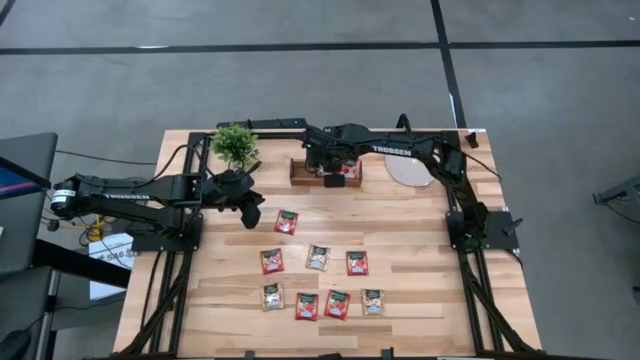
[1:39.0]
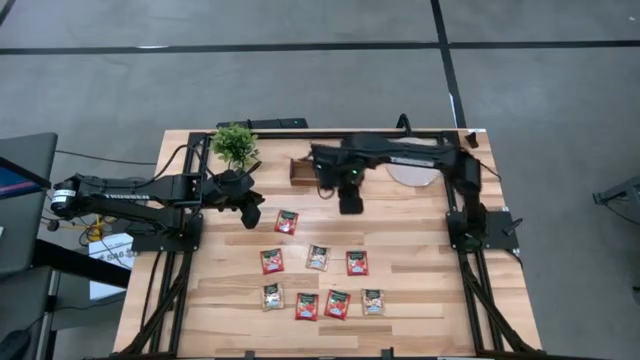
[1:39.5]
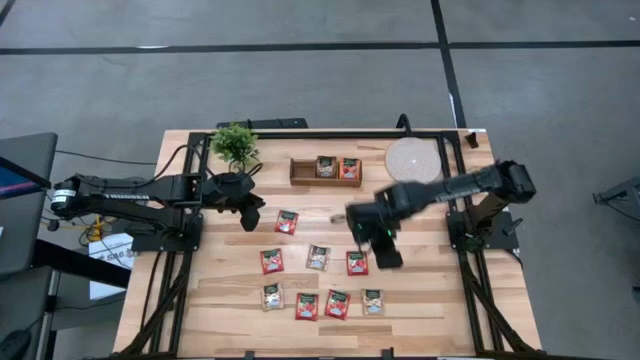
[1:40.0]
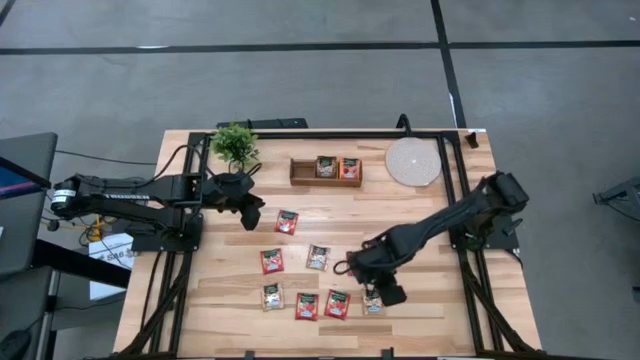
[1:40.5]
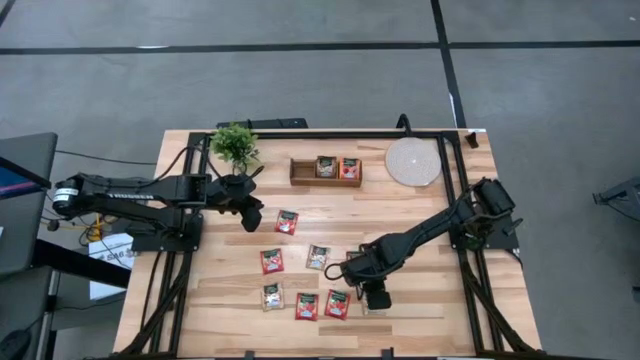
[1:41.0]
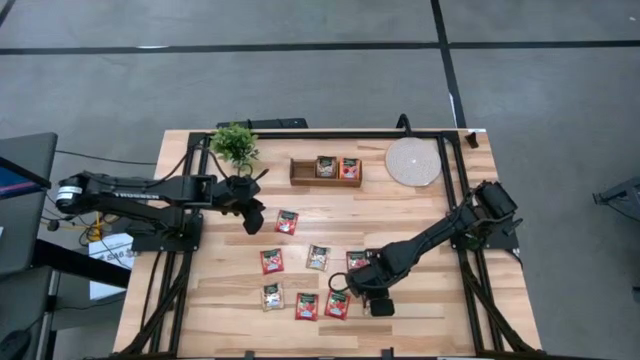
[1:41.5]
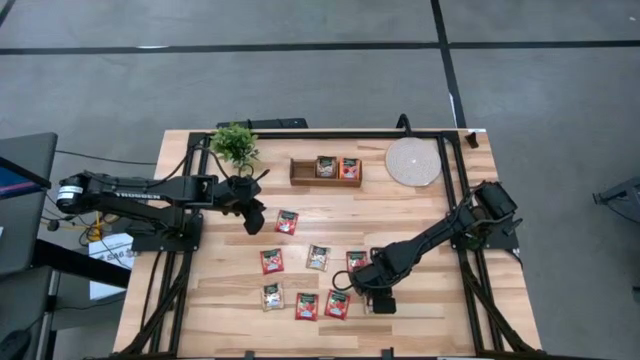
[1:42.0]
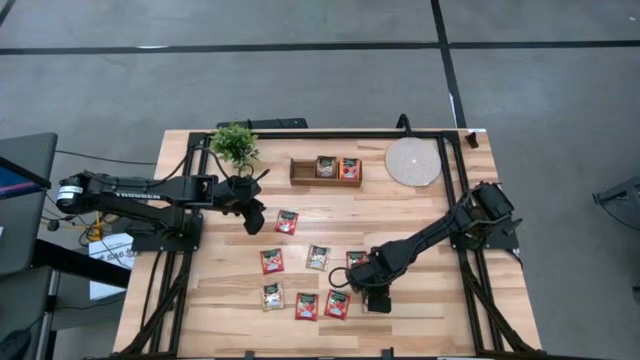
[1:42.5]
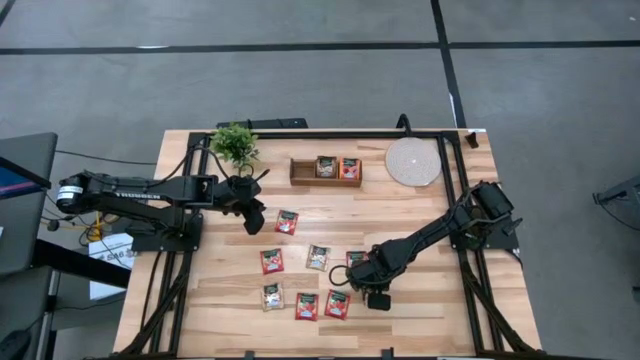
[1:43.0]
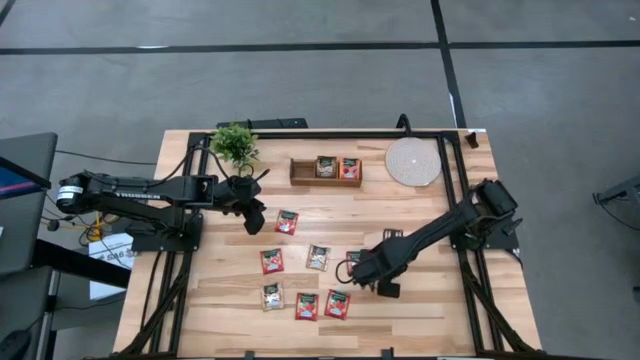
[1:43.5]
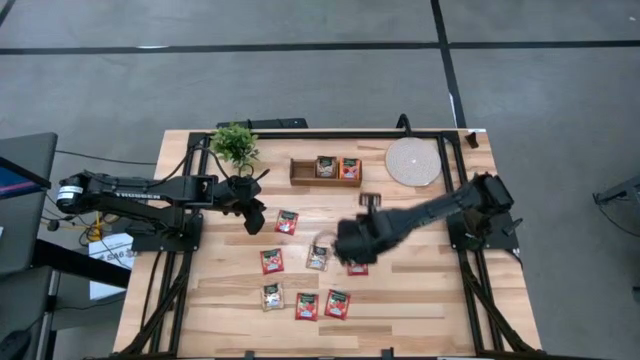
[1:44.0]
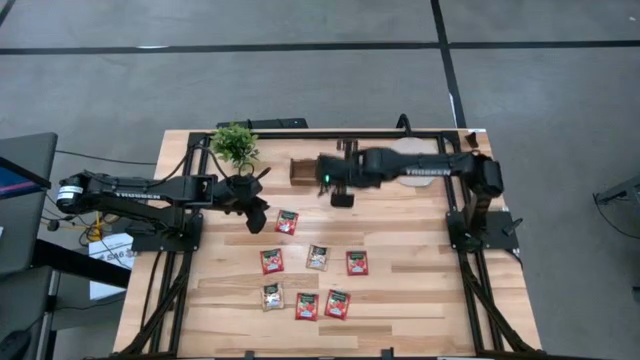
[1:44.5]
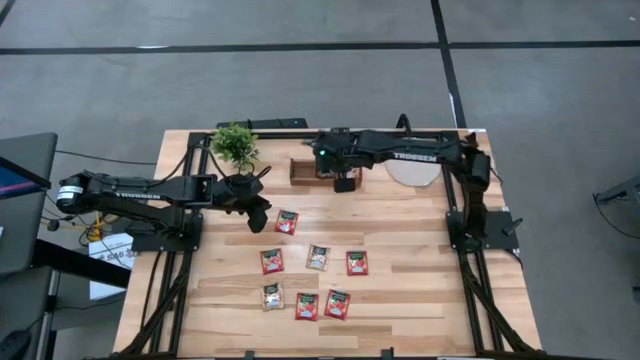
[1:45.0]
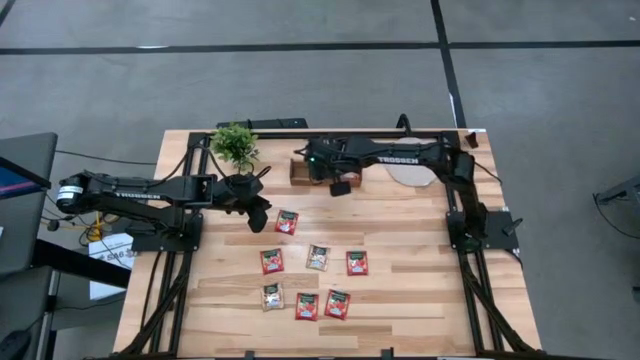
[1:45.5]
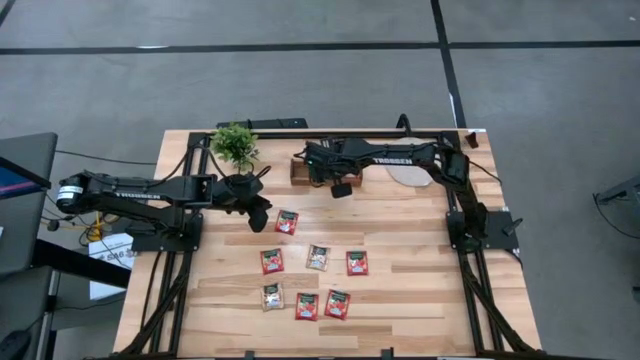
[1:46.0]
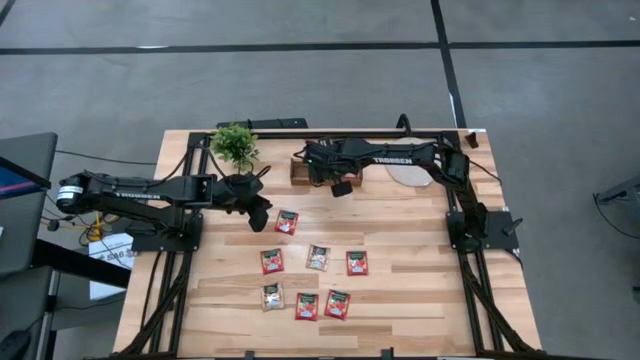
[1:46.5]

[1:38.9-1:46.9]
Task: Pick & Place Tea
Put the right brown tea bag into the middle section of the wooden organizer

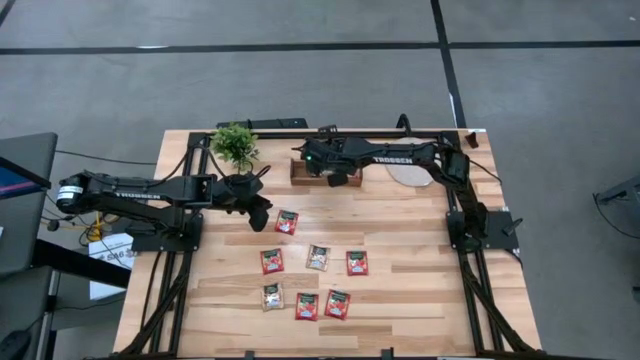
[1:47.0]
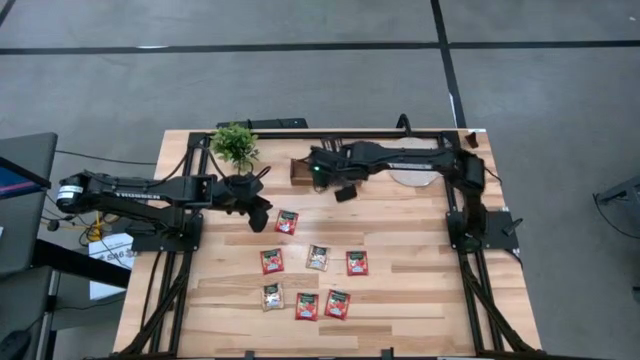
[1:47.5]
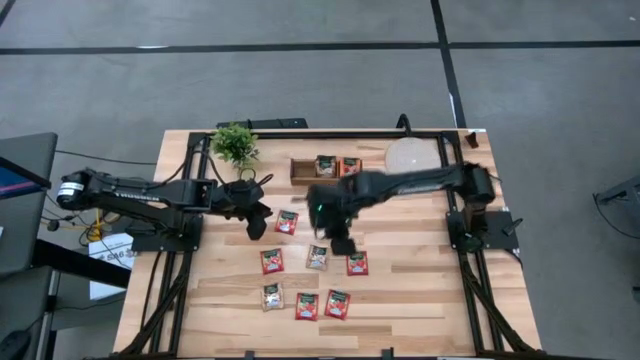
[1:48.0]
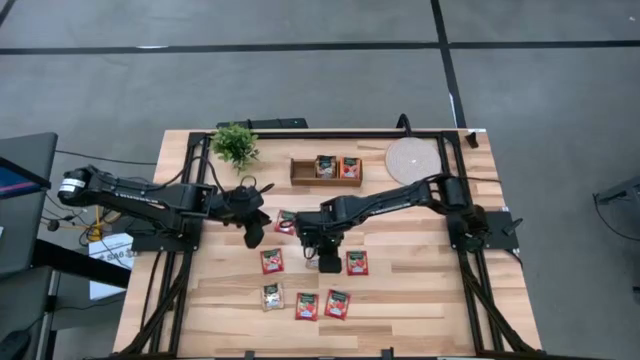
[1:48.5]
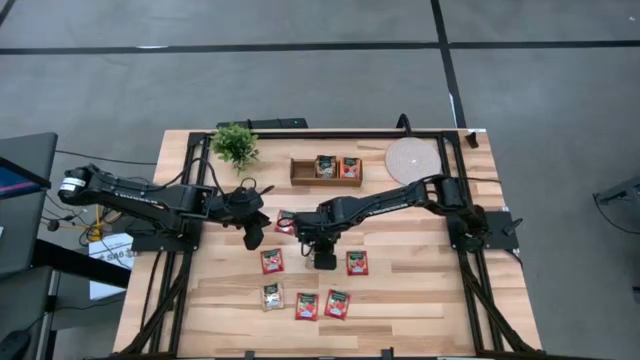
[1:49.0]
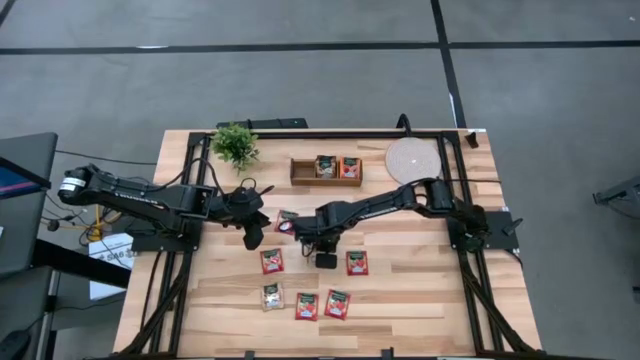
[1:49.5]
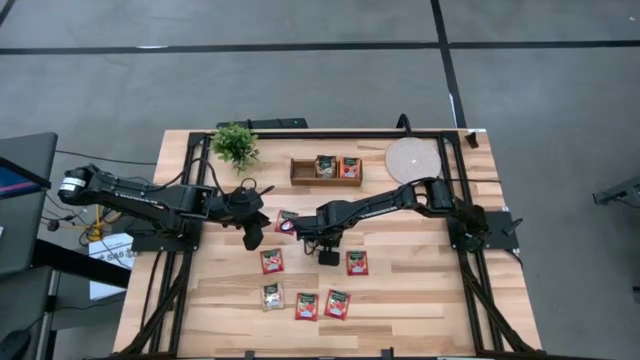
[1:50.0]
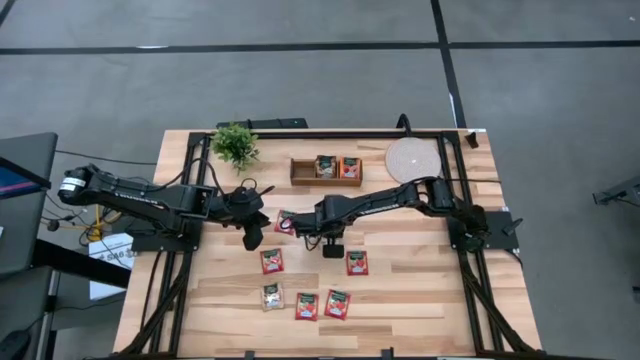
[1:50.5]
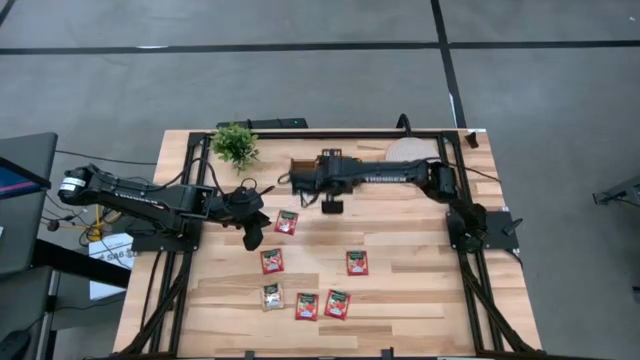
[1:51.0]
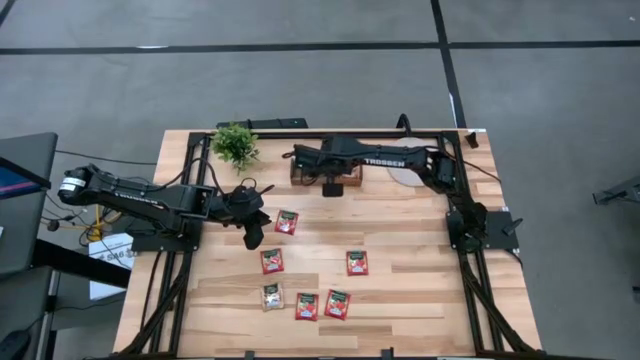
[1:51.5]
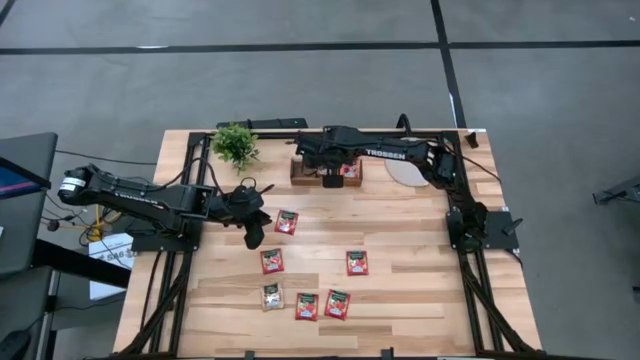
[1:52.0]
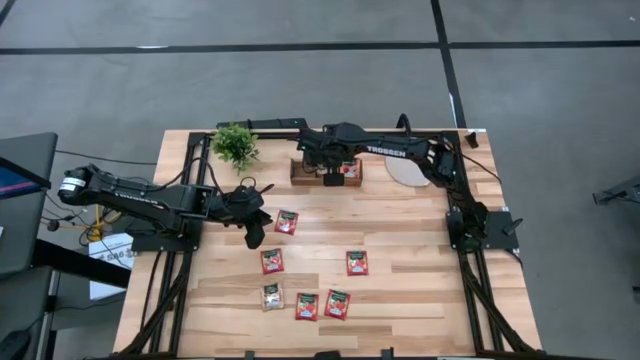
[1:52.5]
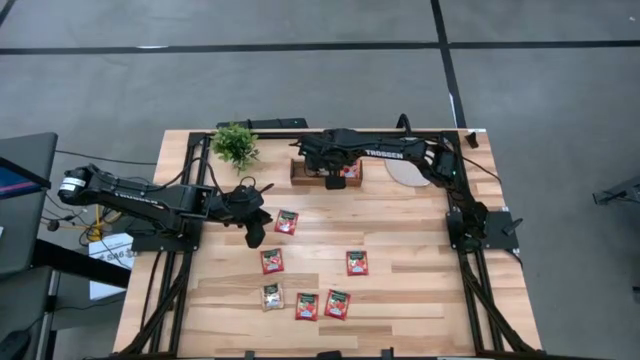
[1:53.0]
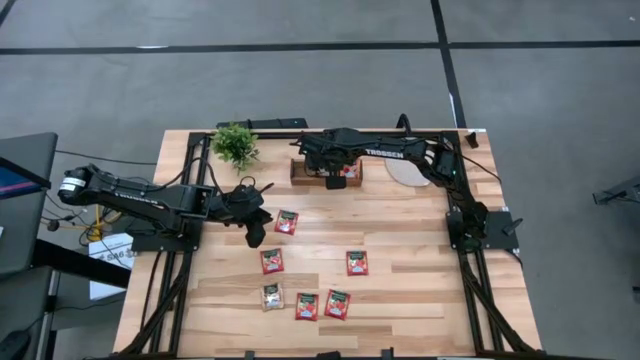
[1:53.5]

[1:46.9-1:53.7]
Put the middle brown tea bag into the middle section of the wooden organizer
